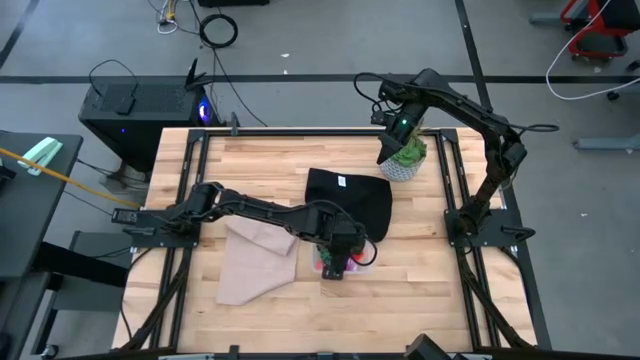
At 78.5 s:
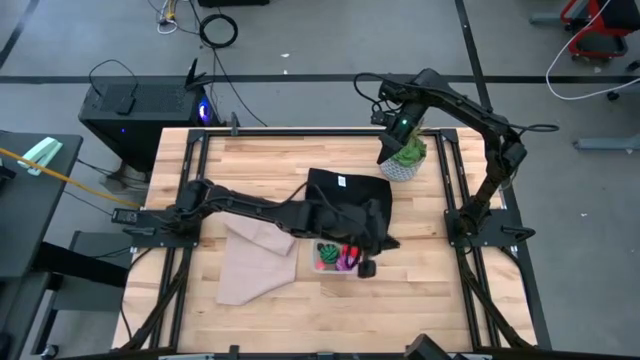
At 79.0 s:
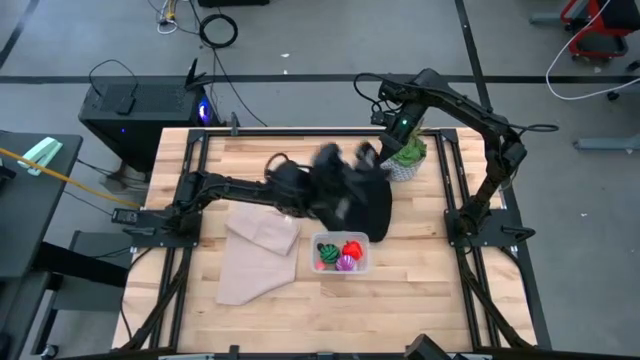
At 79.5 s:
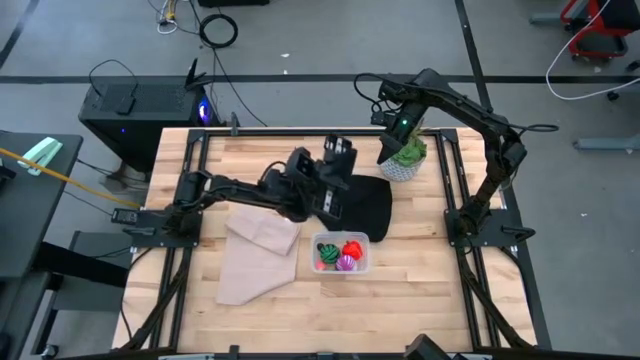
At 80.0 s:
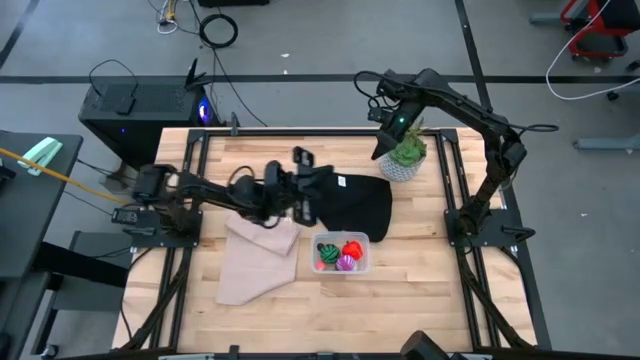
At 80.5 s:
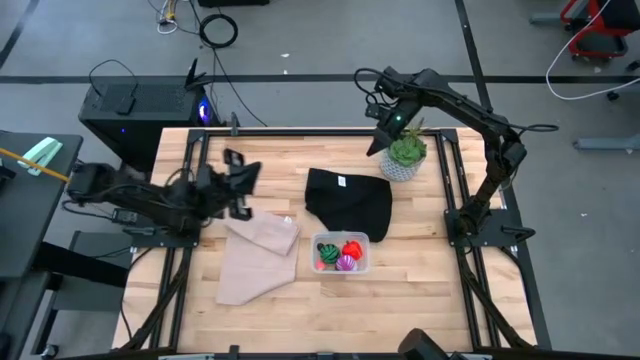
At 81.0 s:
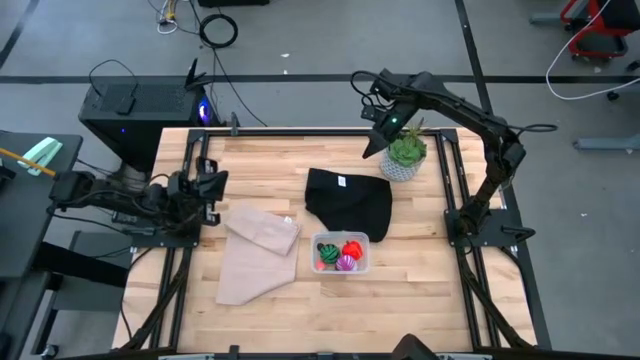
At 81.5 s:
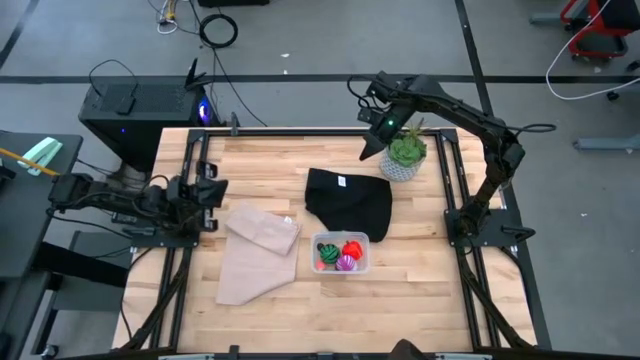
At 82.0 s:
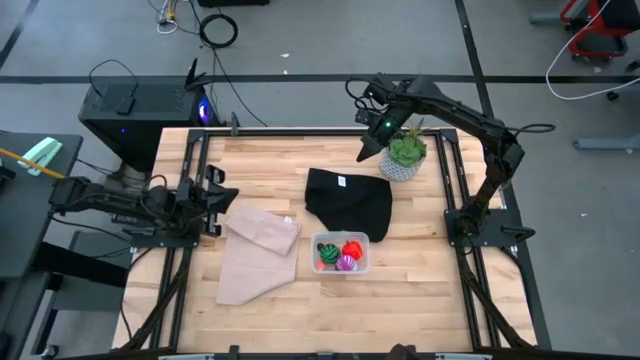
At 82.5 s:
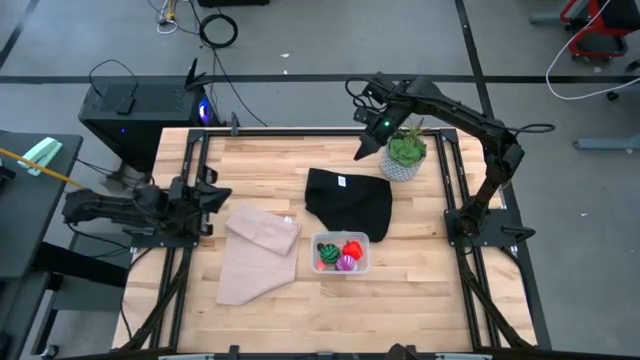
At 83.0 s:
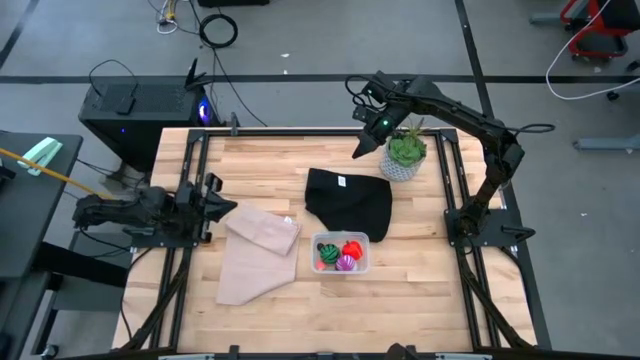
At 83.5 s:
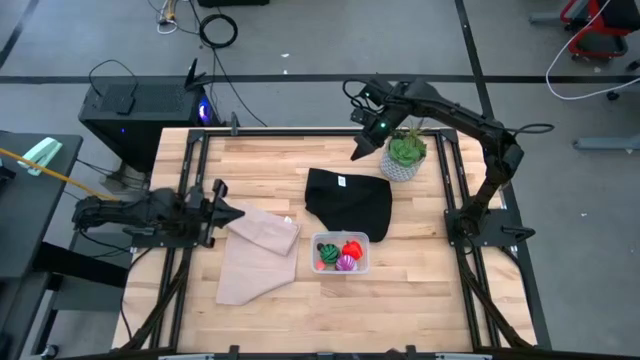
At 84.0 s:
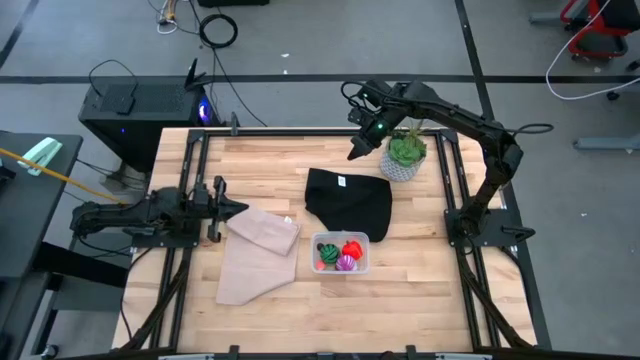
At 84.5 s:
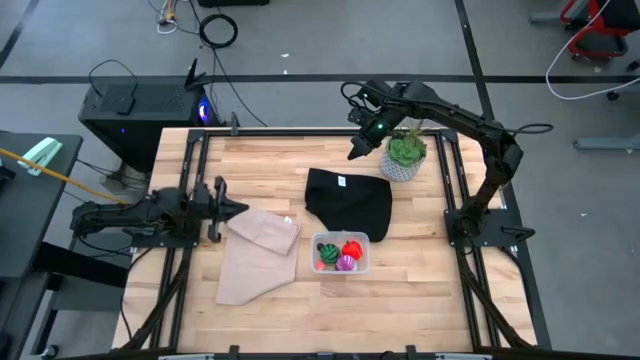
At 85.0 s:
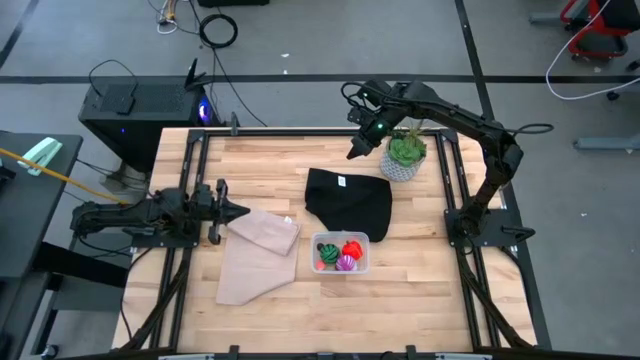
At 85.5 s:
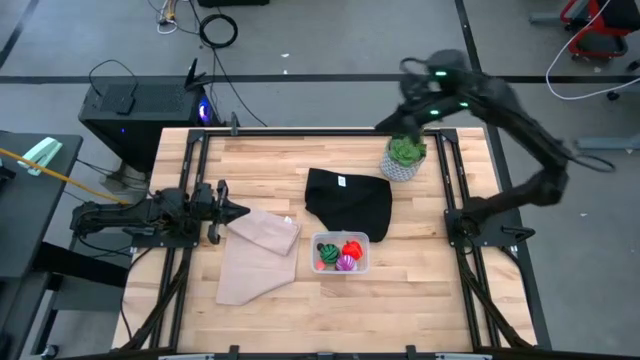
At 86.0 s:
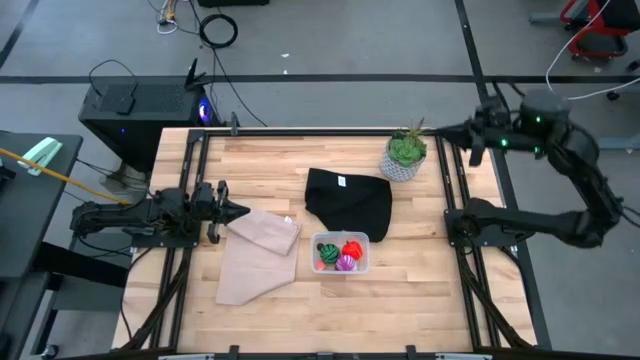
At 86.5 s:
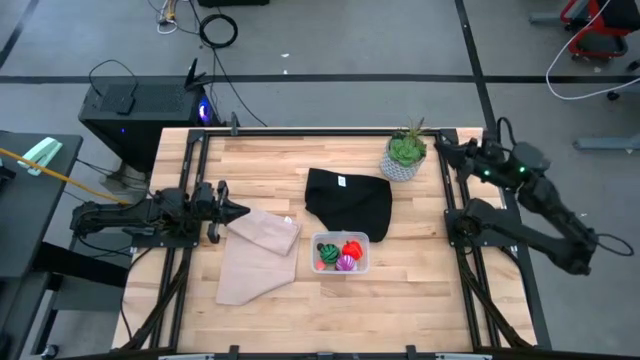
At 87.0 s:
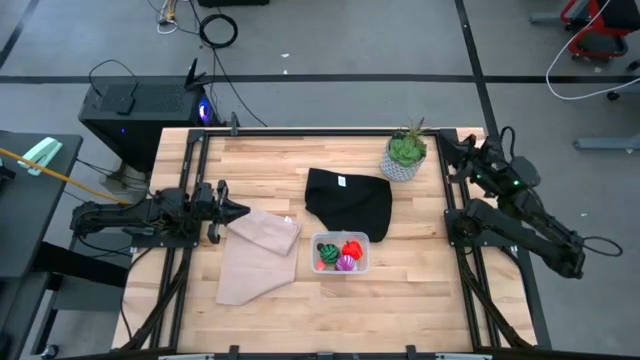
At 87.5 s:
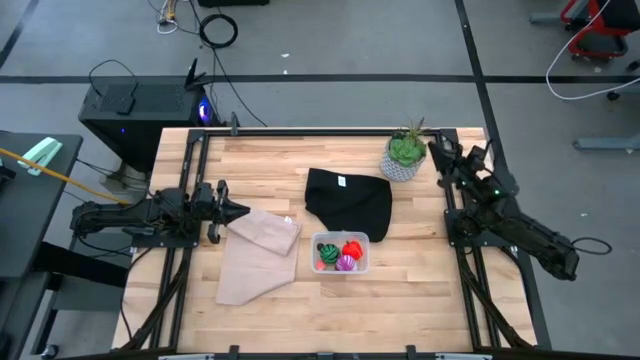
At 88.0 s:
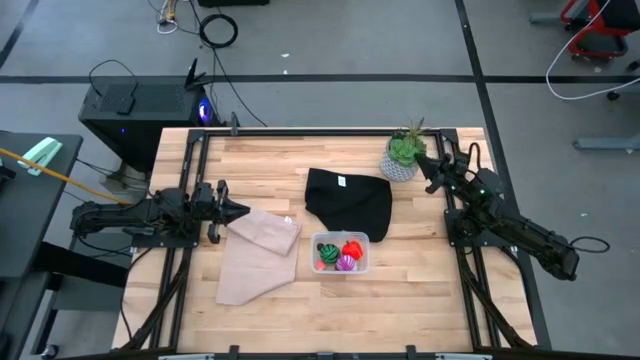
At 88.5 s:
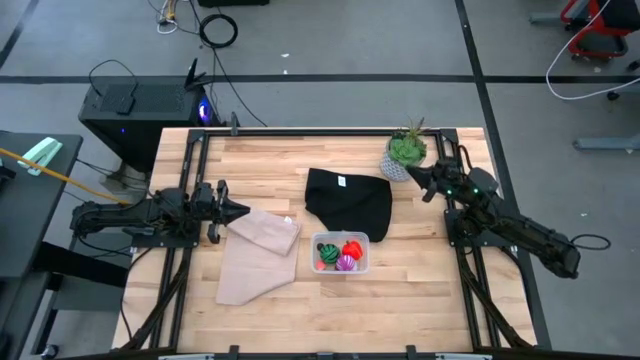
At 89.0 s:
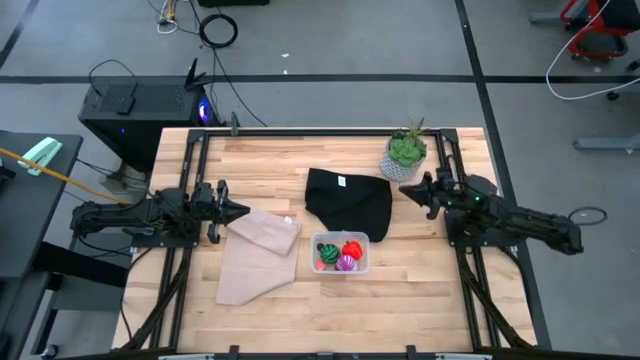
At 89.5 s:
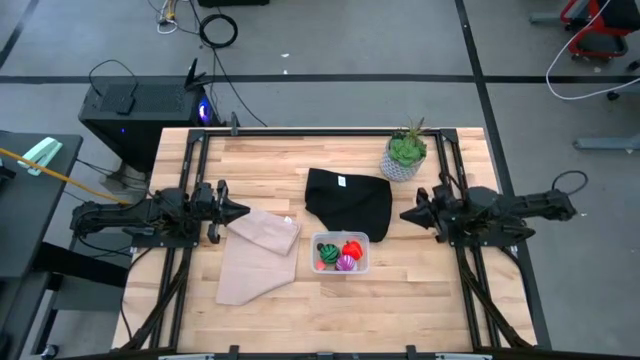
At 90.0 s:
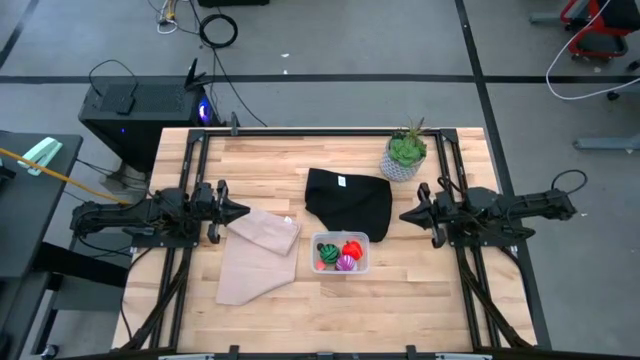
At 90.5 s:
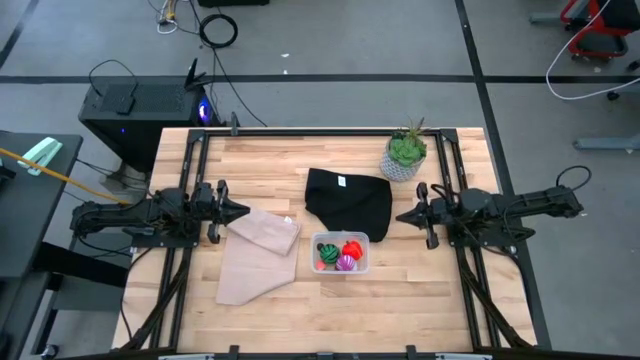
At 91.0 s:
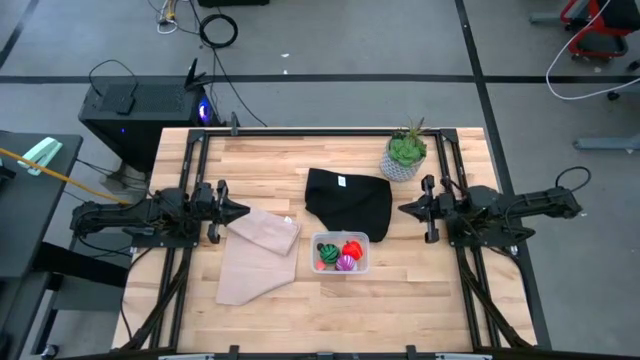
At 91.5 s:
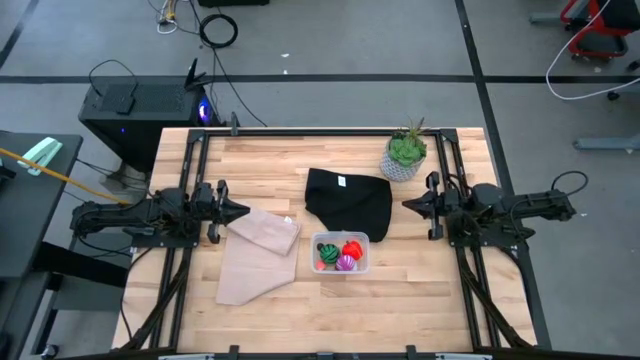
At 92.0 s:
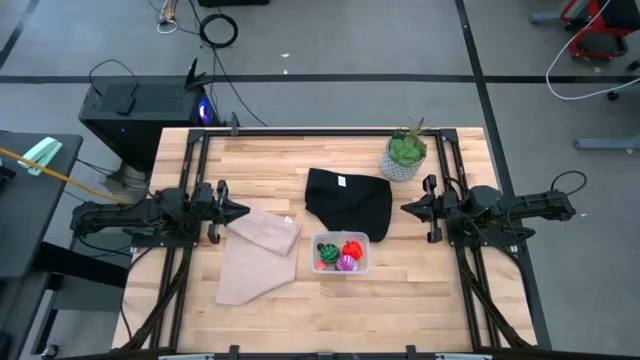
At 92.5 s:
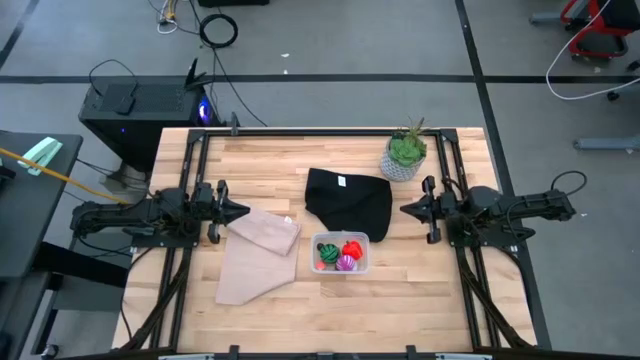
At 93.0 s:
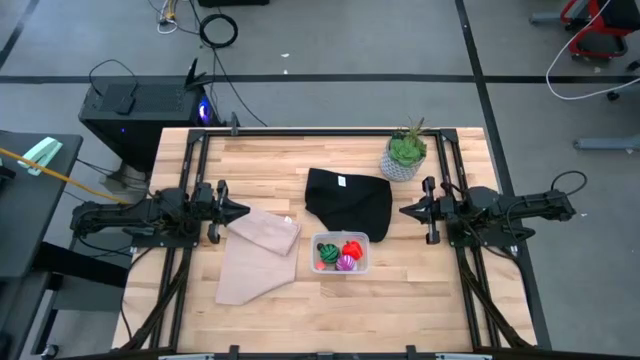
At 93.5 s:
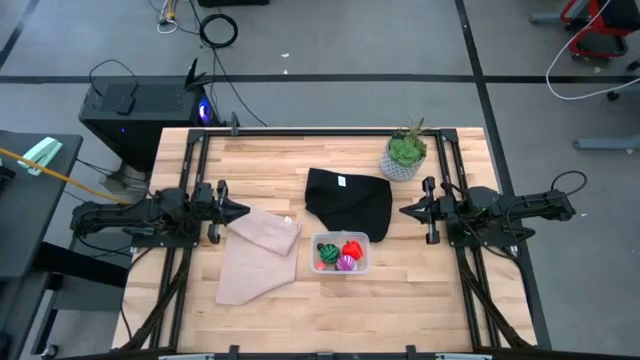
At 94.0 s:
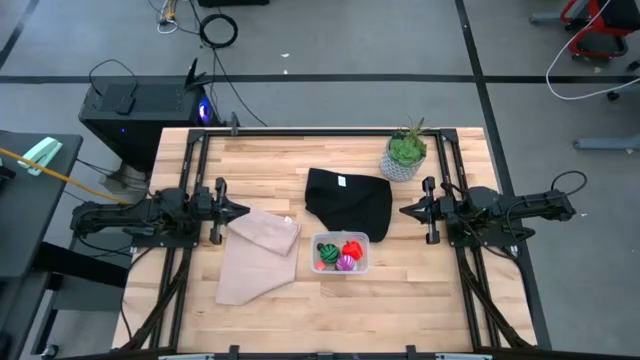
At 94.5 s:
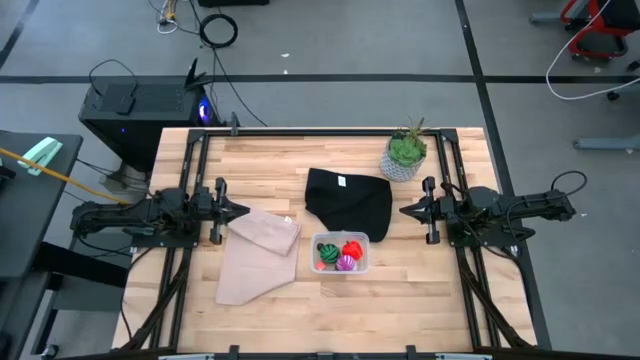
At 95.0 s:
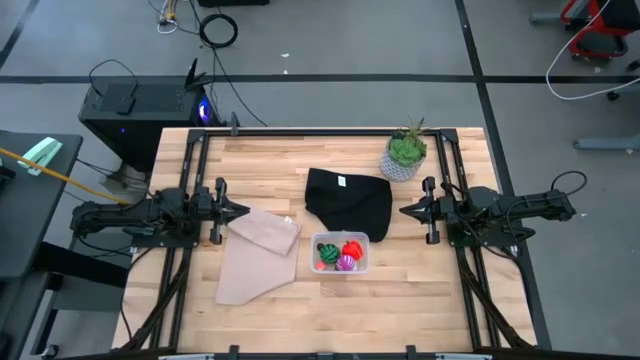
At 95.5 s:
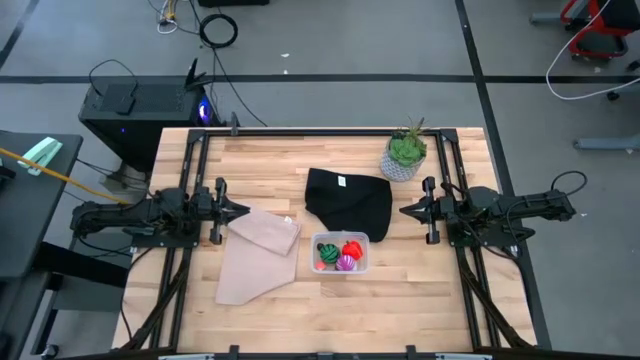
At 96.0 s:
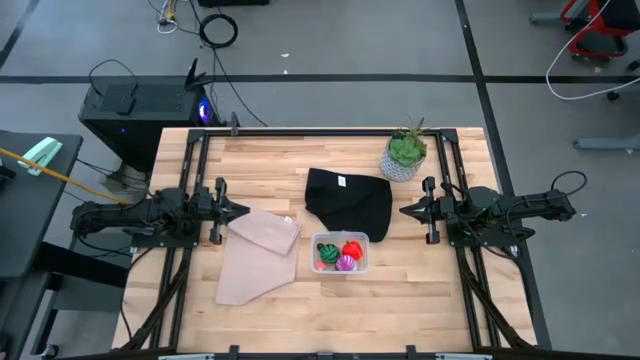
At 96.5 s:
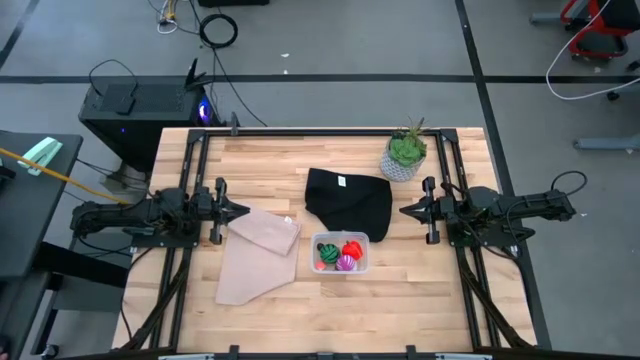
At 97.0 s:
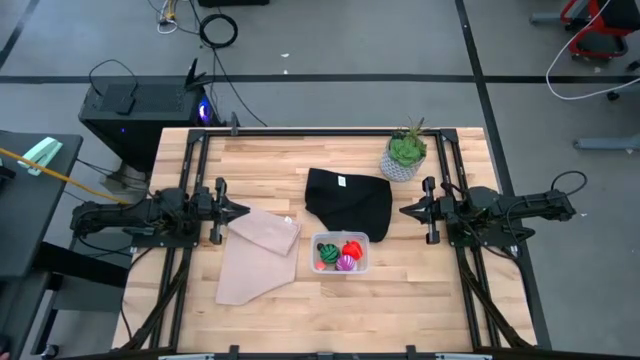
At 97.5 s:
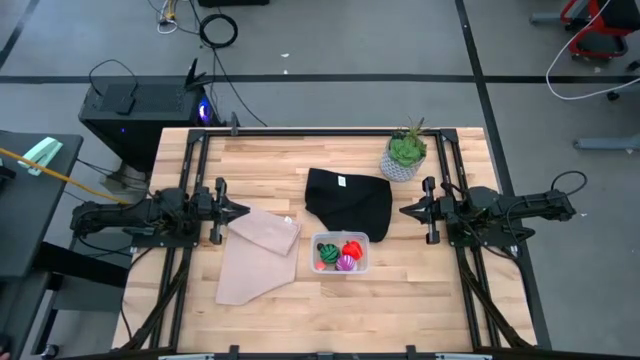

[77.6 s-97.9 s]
Task: Pick and placing Produce into tupperware
Return to Home Position

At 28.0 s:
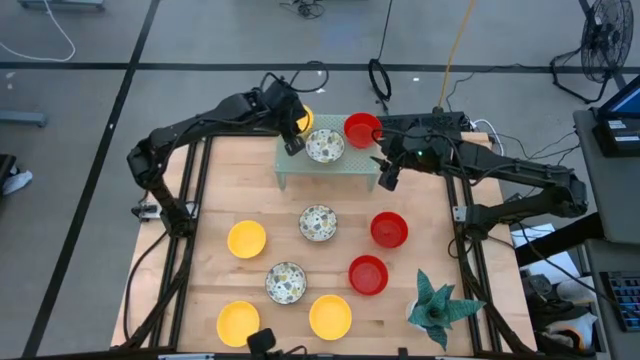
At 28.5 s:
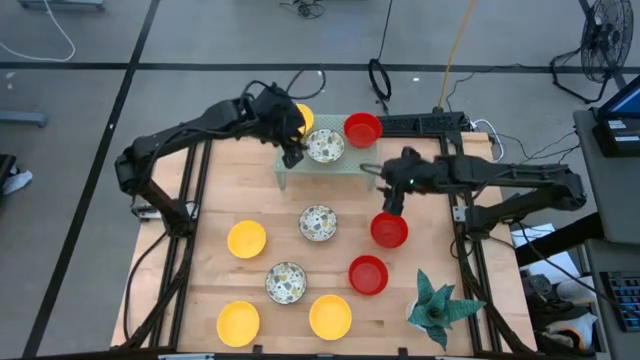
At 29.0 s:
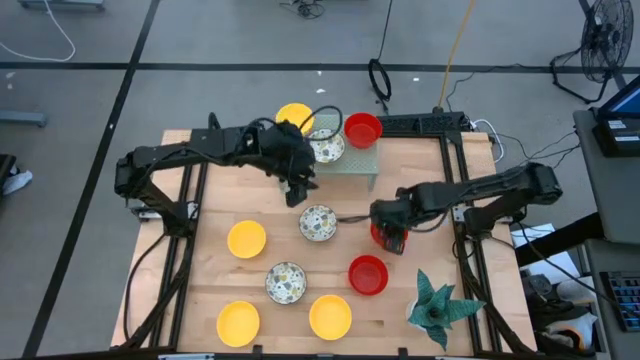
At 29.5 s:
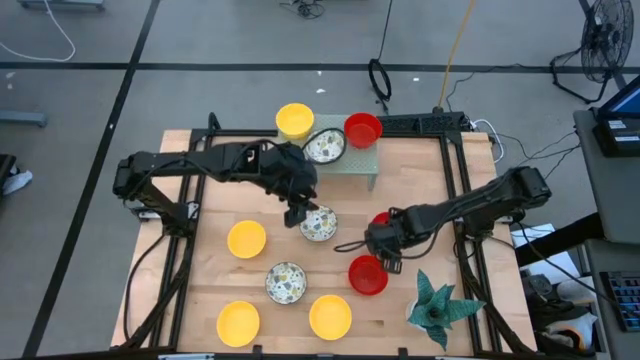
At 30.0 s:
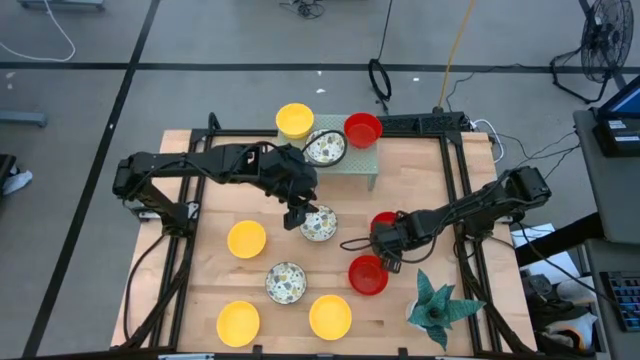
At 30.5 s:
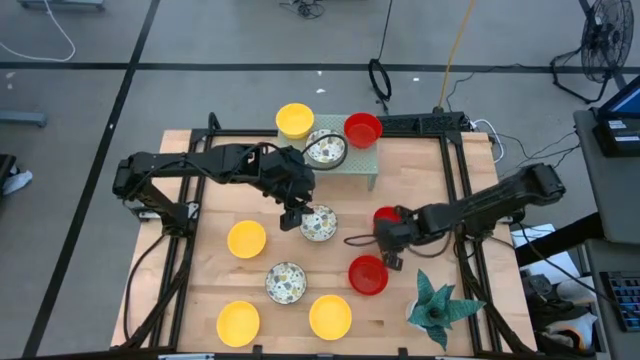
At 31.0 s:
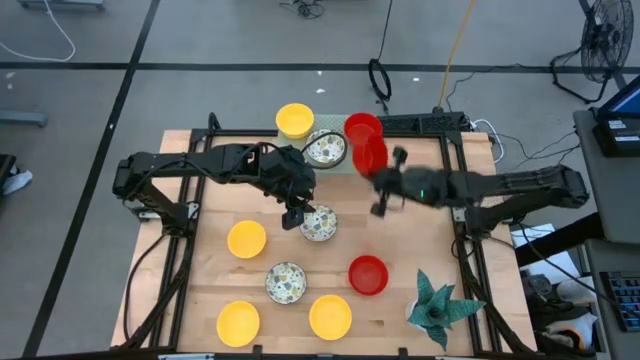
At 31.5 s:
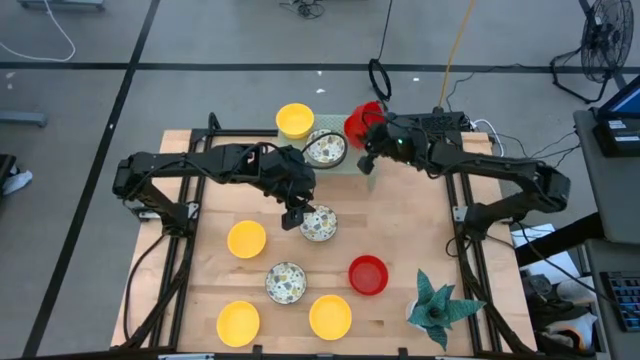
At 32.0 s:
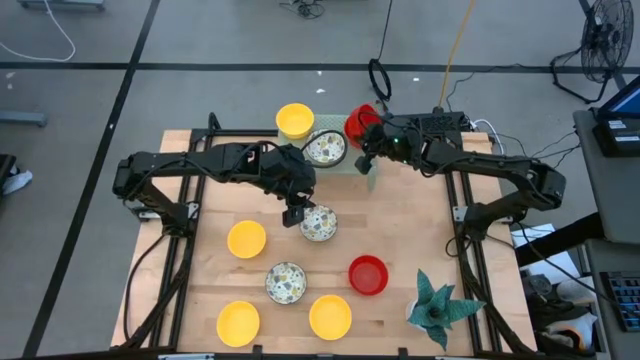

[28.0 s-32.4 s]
Task: Pick & Place Mini bowls
Stack the red bowl on top of the red bowl on the shelf
